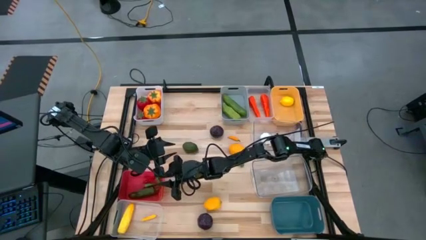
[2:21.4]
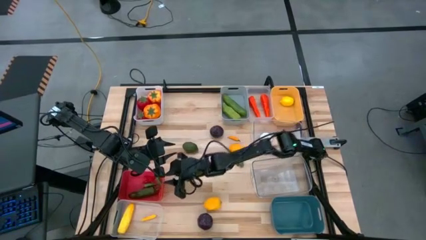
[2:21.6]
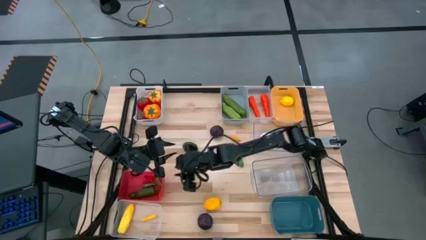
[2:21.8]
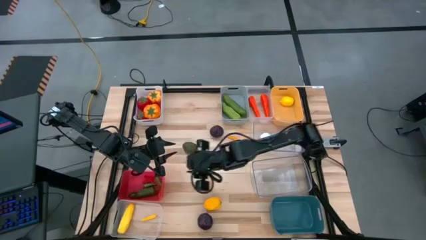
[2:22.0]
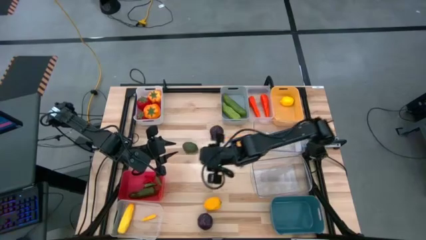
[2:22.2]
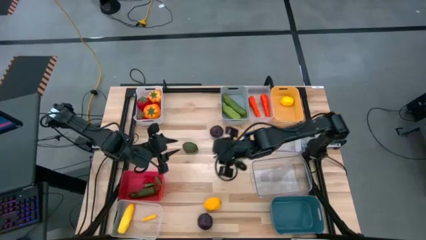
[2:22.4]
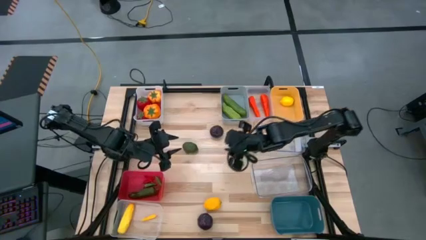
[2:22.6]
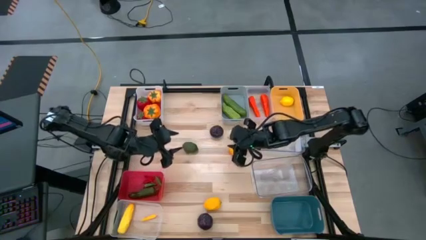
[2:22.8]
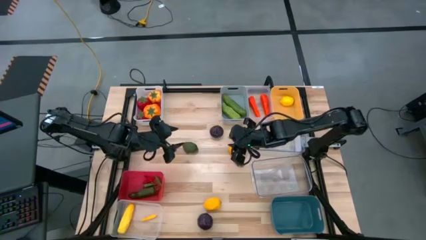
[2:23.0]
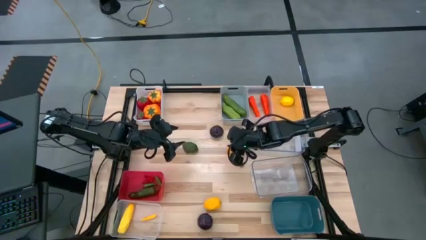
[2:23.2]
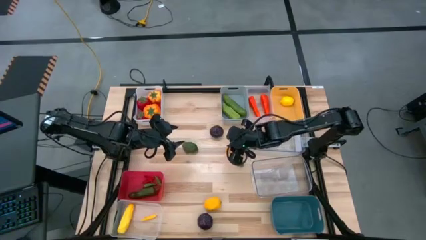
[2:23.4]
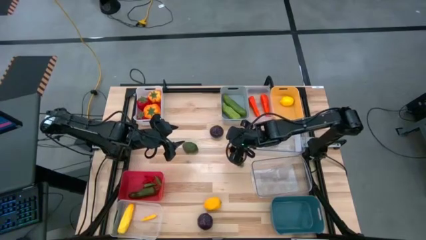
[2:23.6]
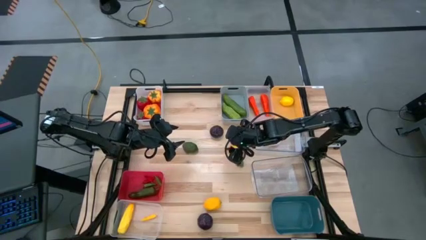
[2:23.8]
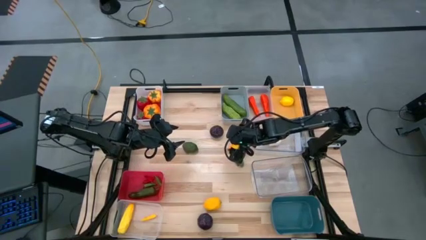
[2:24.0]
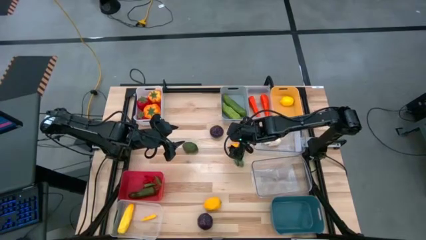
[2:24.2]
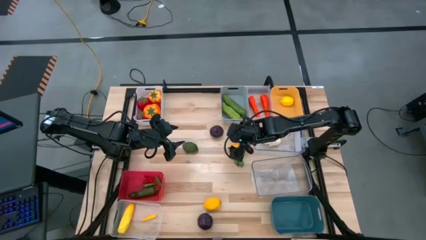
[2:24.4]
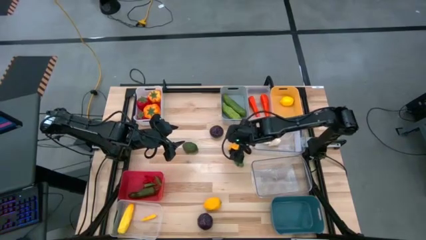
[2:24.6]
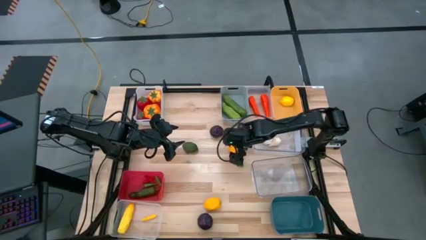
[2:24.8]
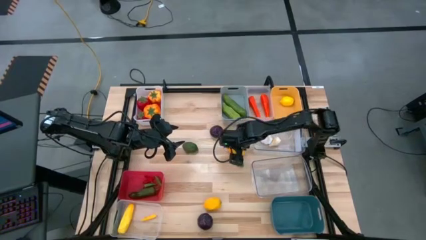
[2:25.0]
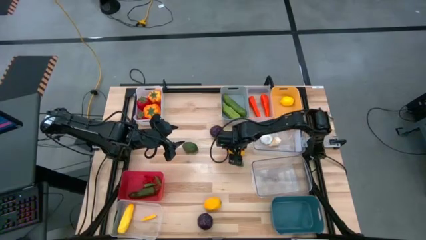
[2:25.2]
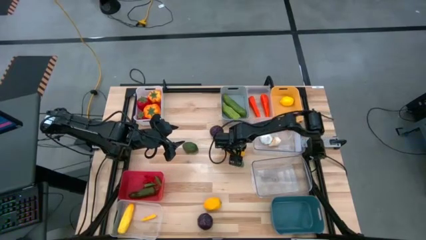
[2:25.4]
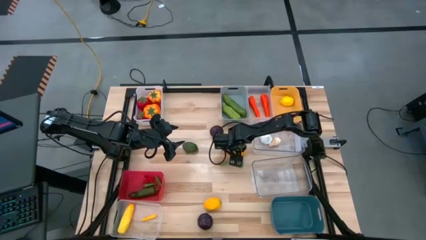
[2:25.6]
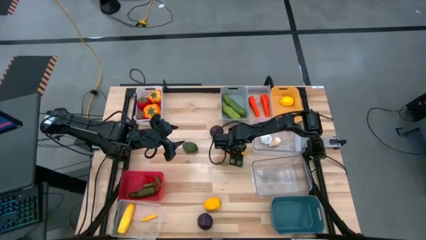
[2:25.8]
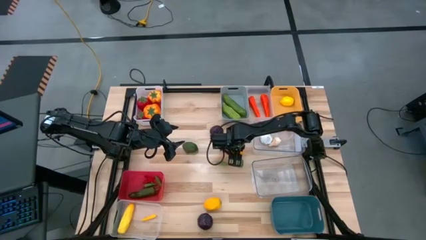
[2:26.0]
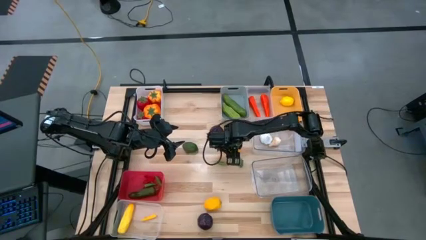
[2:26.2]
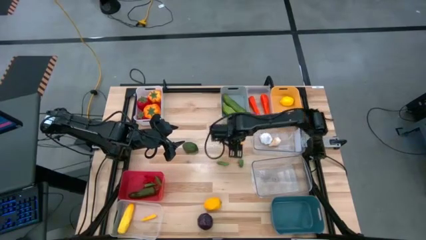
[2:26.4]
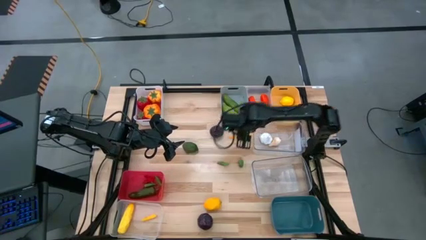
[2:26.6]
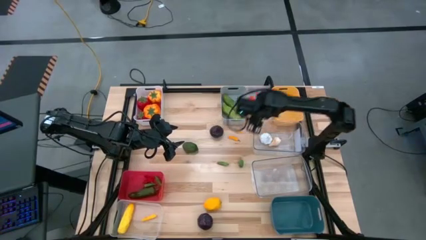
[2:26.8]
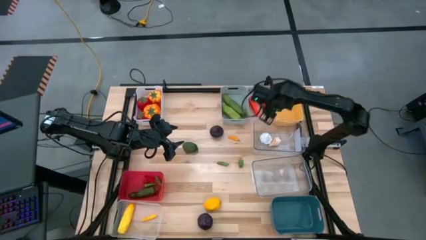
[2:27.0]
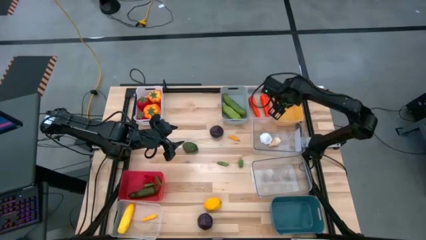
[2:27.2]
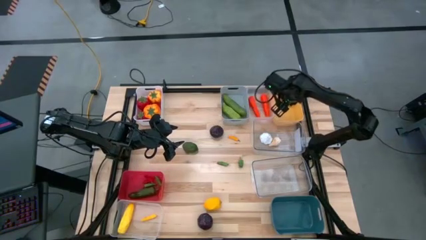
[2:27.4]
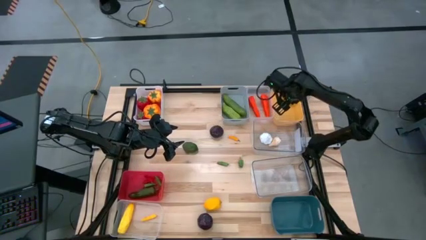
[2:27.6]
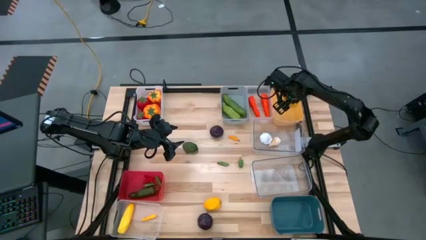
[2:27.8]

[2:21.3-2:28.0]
Task: Sort produce into baskets
Put the top yellow lemon into the yellow bin

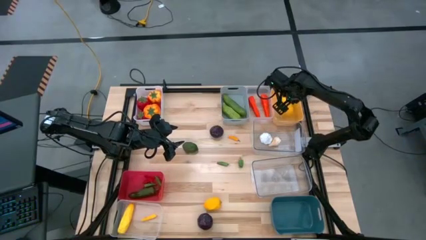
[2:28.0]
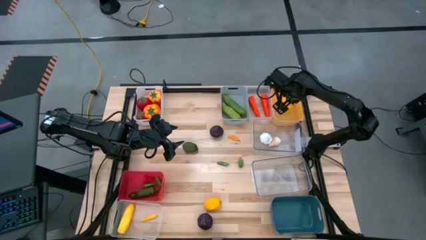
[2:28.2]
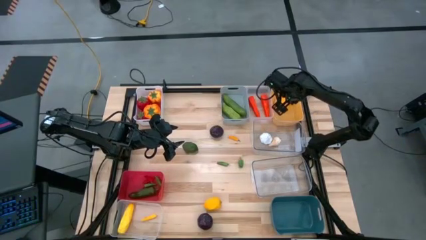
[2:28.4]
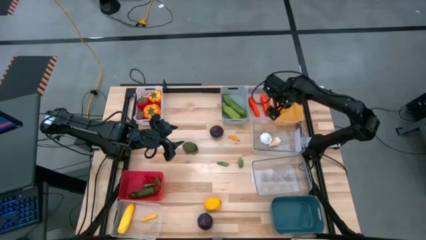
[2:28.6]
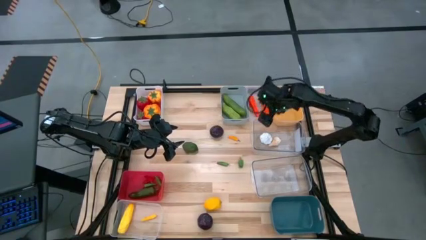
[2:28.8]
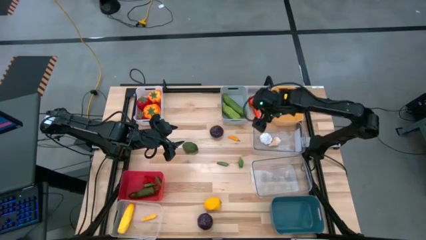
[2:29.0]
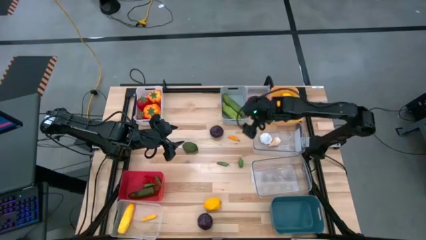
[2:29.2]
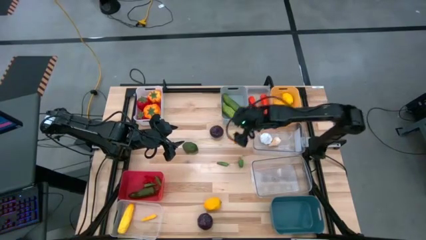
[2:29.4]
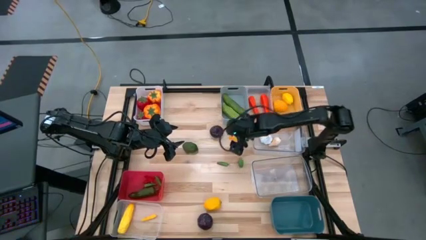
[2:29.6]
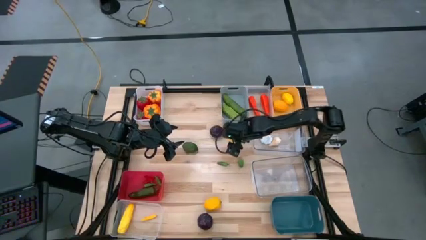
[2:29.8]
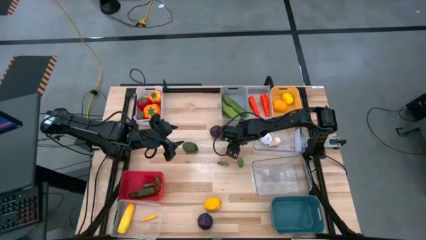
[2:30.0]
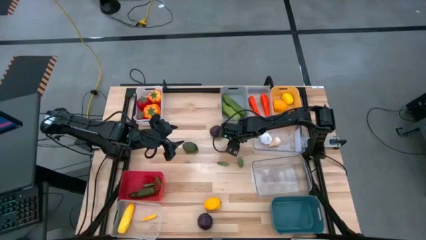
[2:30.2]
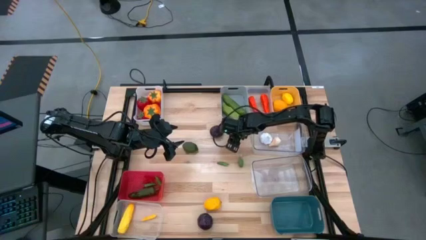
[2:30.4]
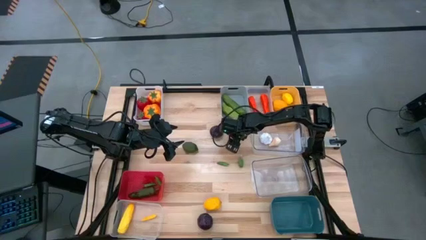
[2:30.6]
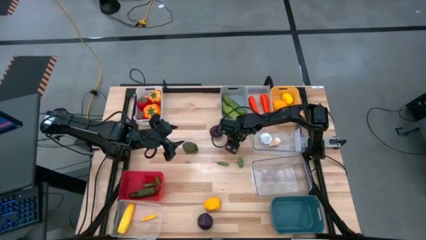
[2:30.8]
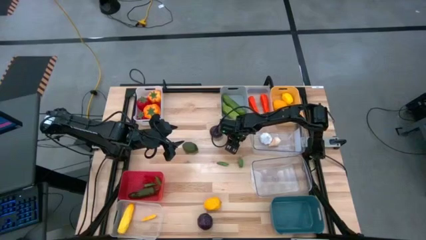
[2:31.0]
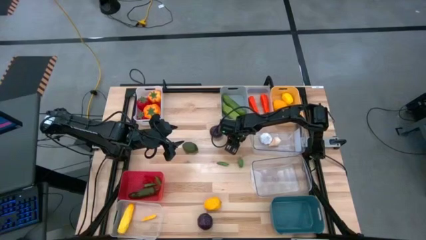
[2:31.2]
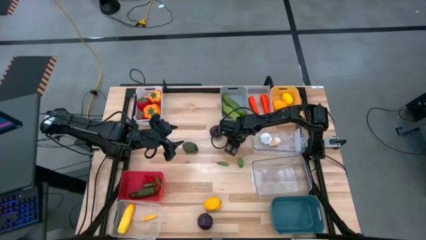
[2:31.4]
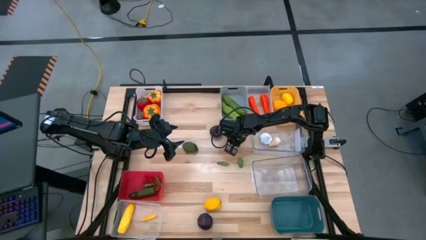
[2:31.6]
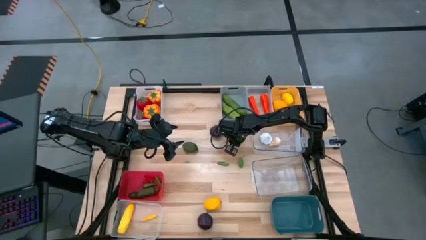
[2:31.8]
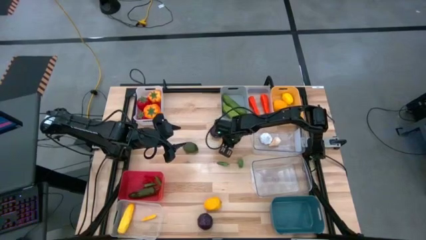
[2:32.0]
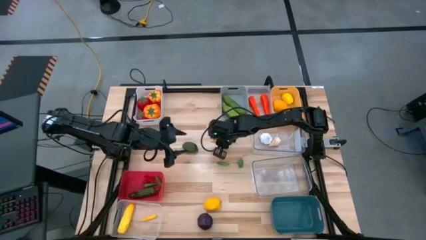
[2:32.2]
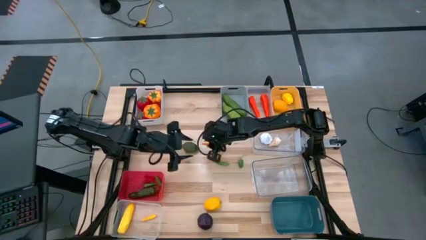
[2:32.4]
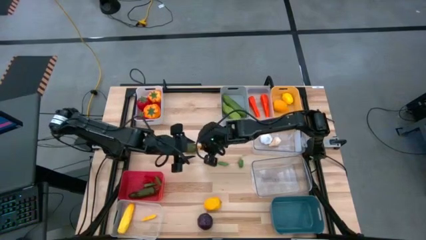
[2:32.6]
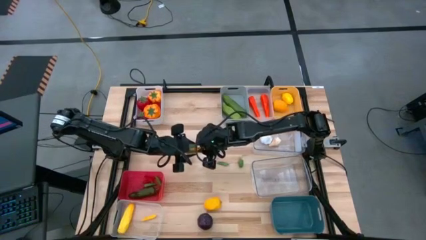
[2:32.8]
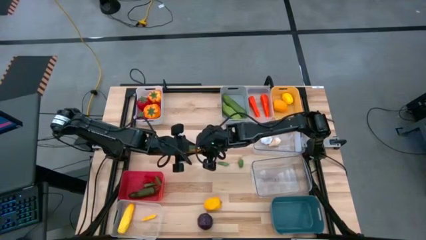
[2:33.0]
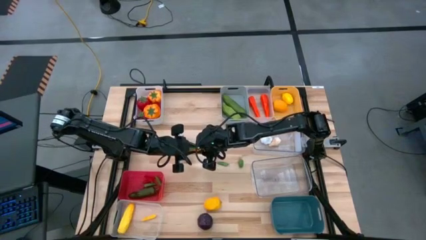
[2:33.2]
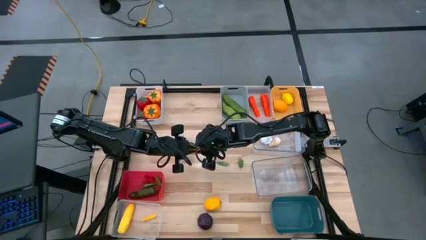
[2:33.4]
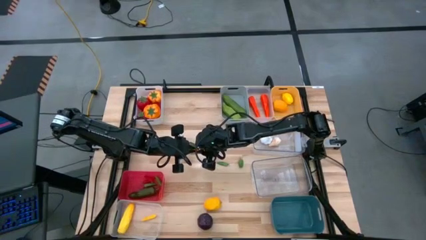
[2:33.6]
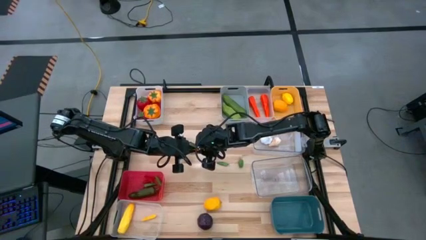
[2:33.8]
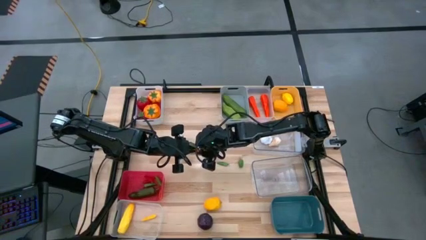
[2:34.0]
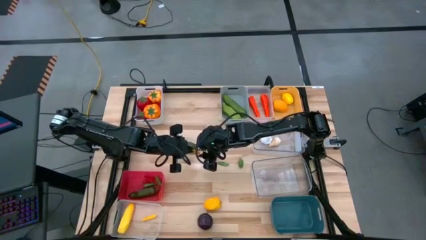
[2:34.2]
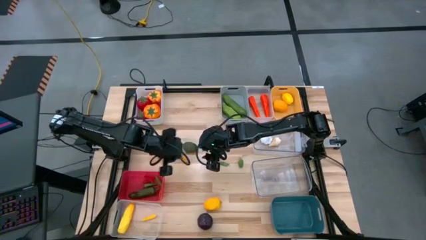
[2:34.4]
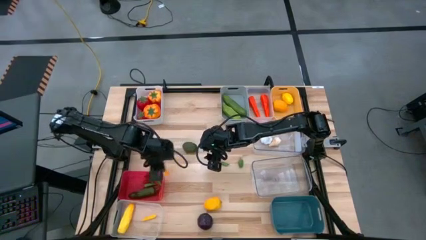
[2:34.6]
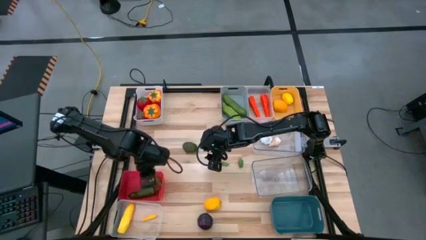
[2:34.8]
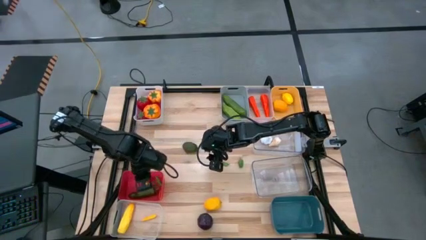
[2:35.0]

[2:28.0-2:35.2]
Put the yellow chili pepper into the red bin

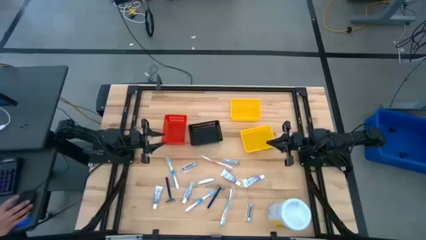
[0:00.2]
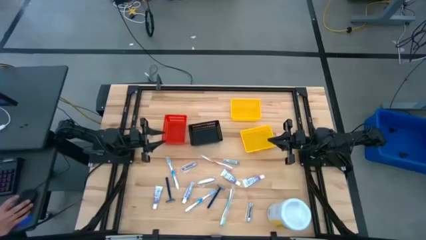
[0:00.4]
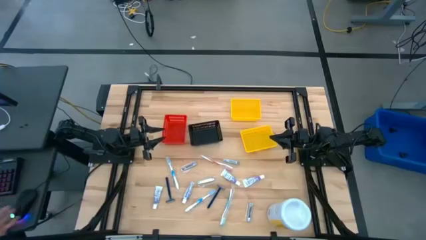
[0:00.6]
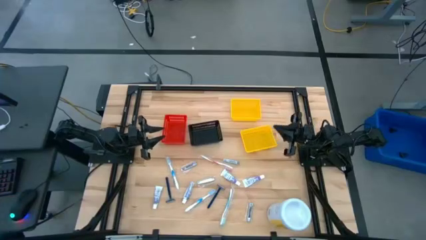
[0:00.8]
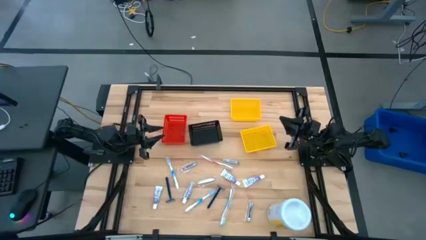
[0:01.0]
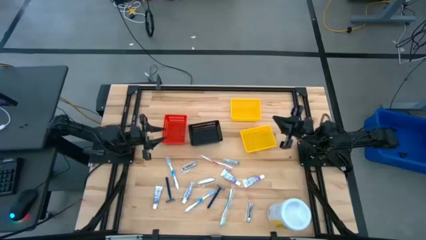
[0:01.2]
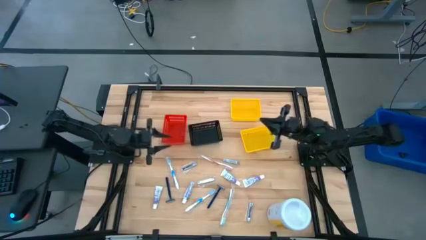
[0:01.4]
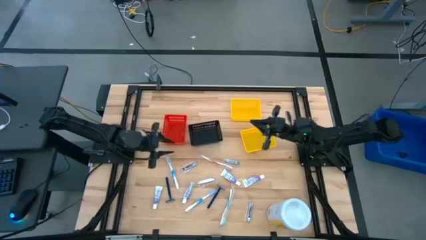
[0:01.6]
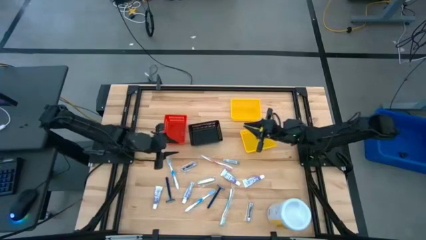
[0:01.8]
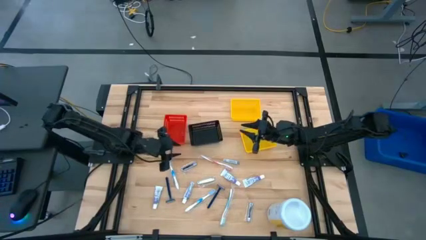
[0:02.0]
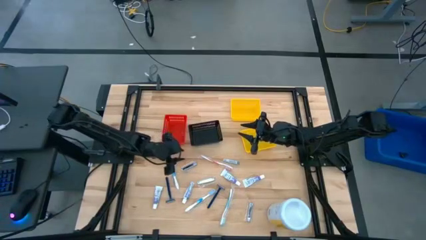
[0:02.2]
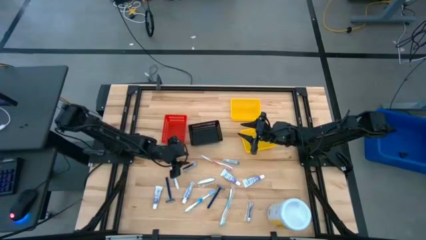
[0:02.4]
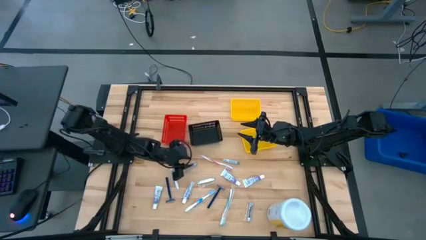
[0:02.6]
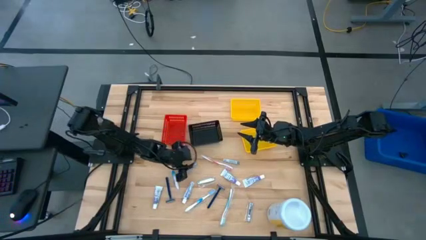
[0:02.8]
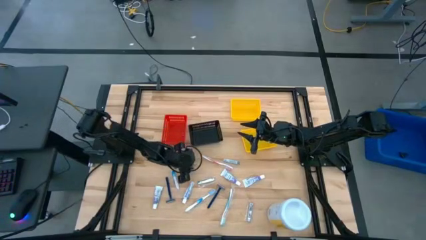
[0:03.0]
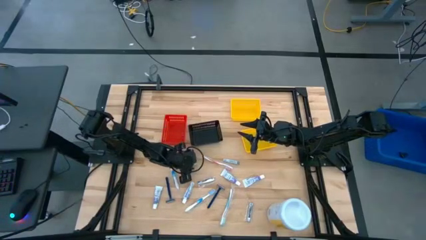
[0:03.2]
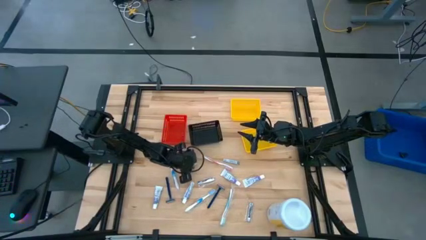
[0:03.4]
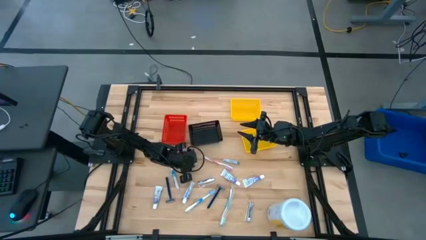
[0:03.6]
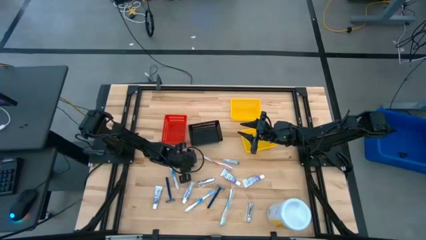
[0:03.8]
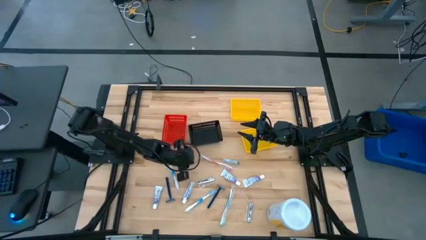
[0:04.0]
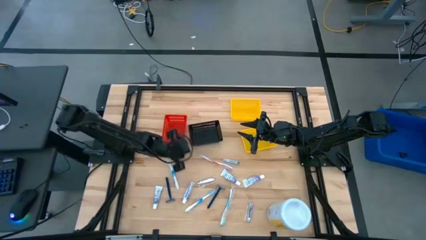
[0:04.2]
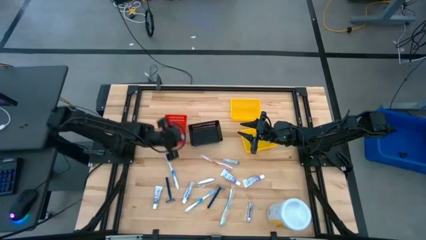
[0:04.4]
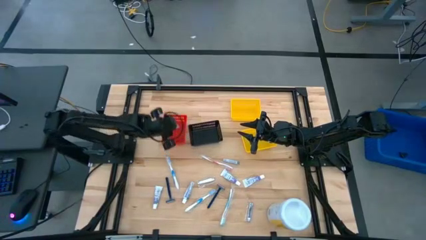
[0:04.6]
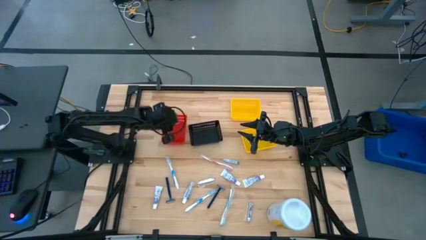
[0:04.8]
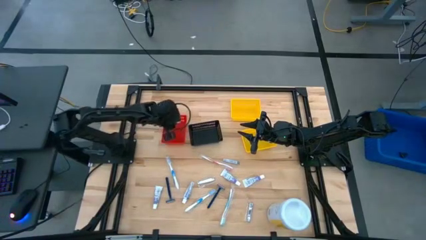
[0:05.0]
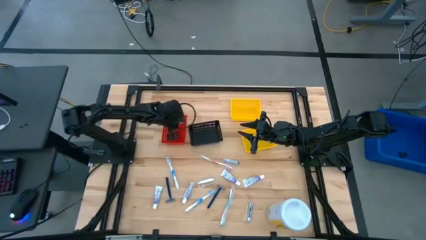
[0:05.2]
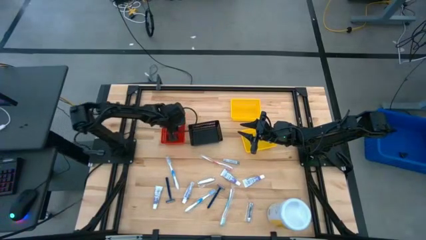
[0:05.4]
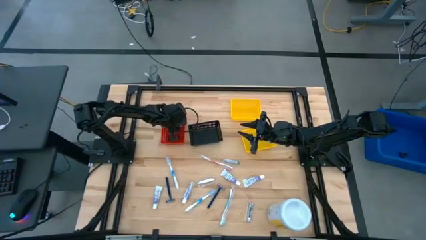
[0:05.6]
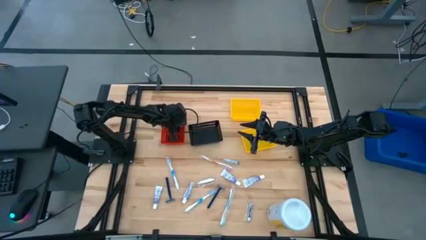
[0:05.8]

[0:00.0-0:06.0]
Task: Pick & Place Travel size toiletries
Put the silver nail cutter into the red bin
